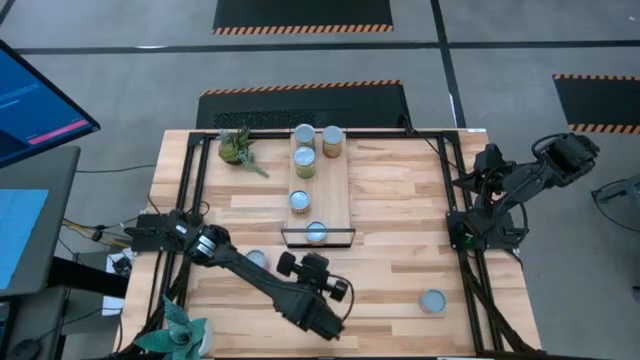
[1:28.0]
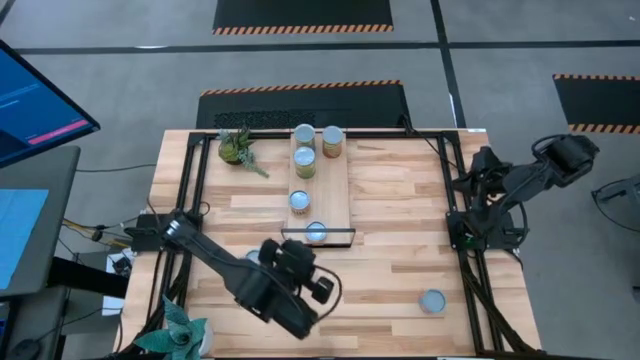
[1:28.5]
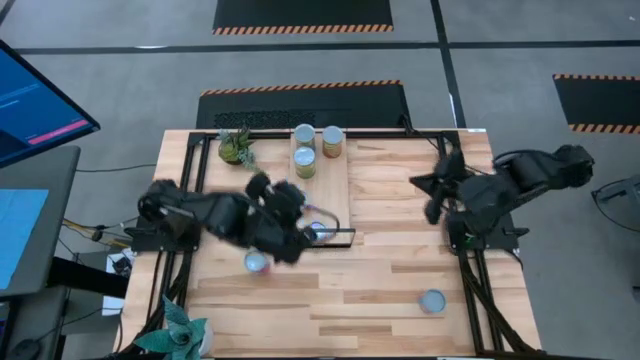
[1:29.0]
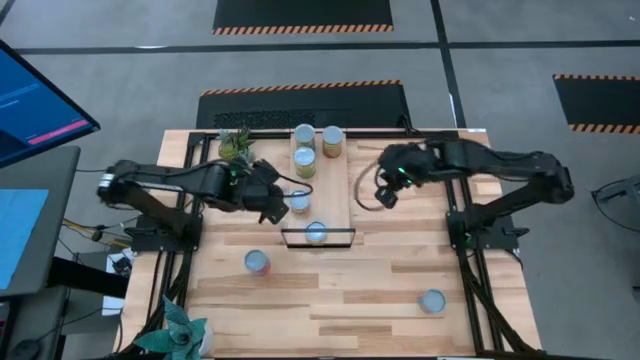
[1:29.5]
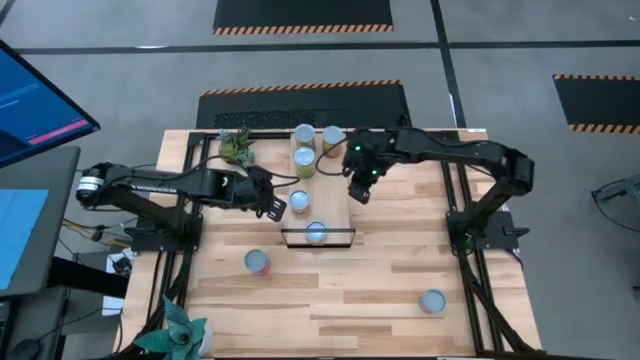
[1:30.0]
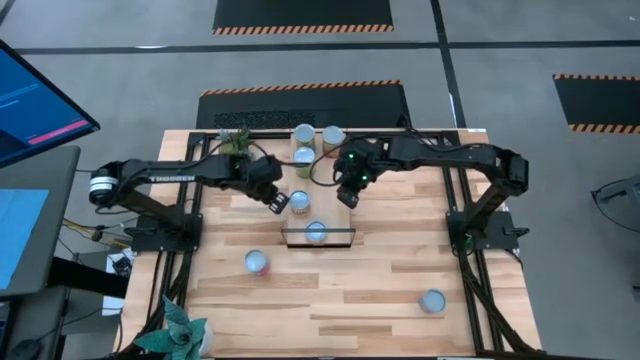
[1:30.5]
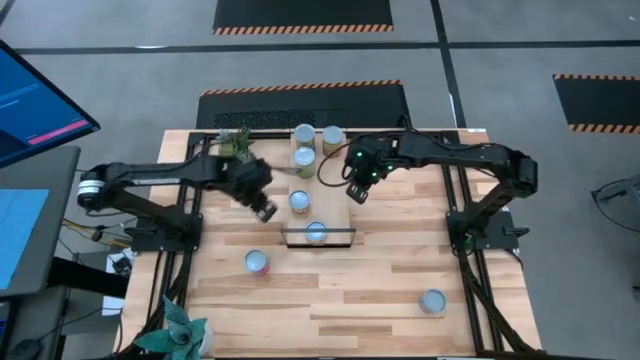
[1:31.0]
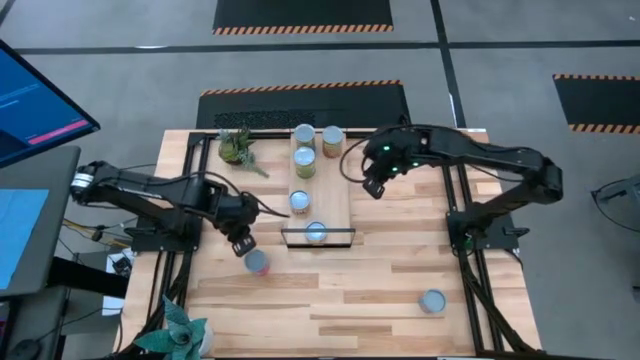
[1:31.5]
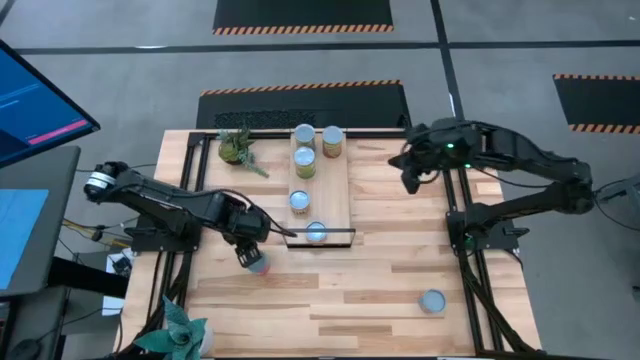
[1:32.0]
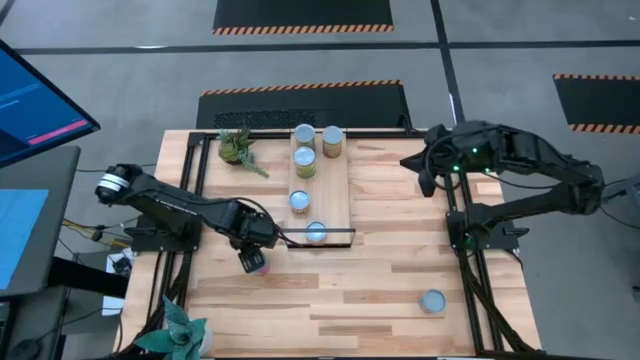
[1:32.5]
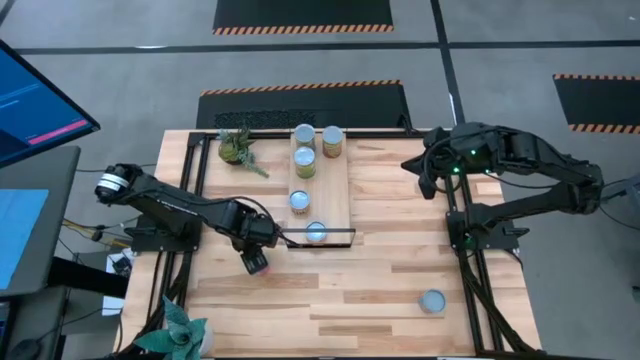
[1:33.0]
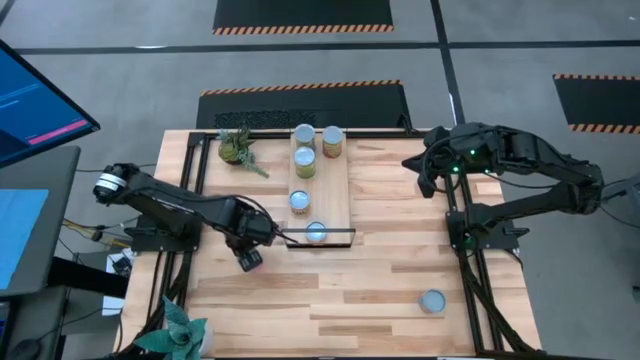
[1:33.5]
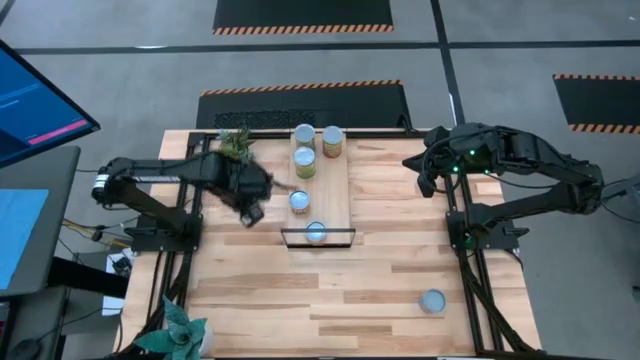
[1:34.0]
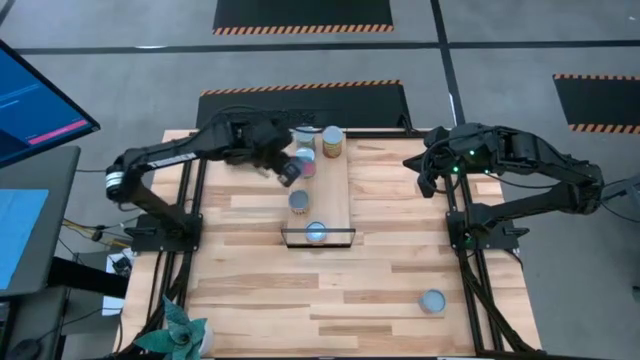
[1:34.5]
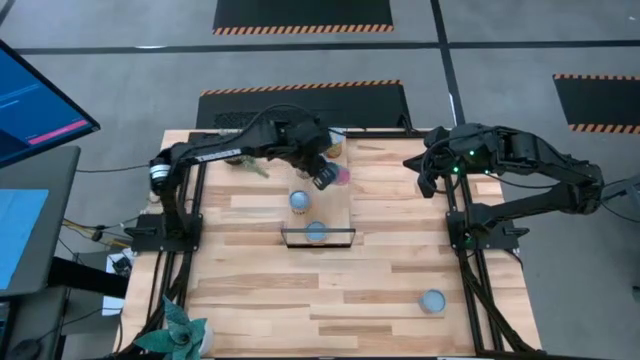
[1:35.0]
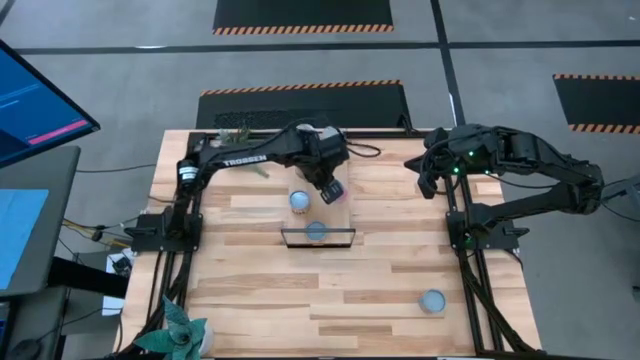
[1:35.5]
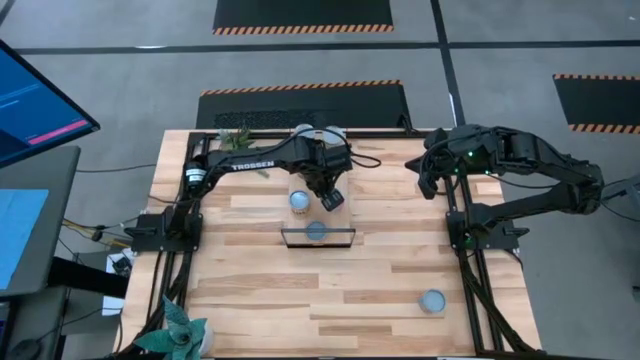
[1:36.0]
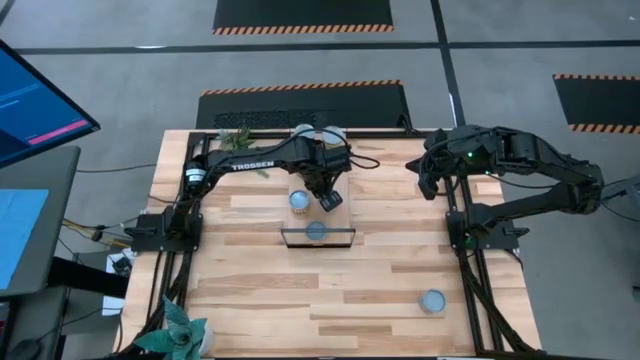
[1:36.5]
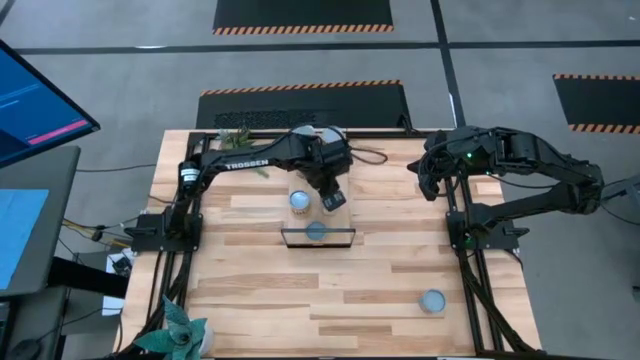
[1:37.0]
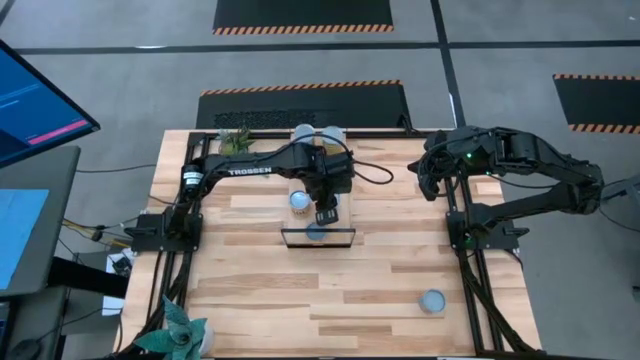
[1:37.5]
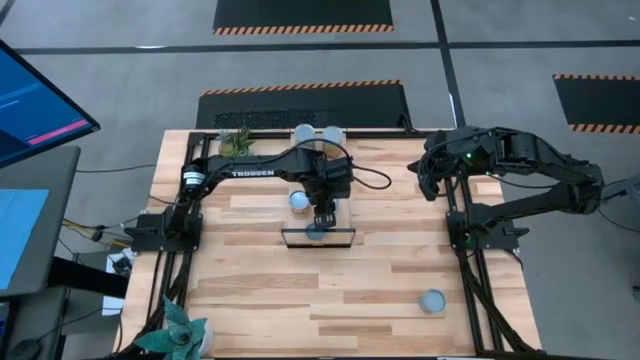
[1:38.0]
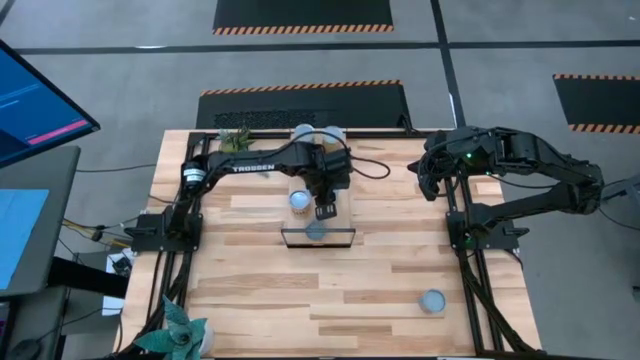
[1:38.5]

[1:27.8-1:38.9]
Task: Pick and place cans onto a shelf
Put the canned chicken soup on the shelf

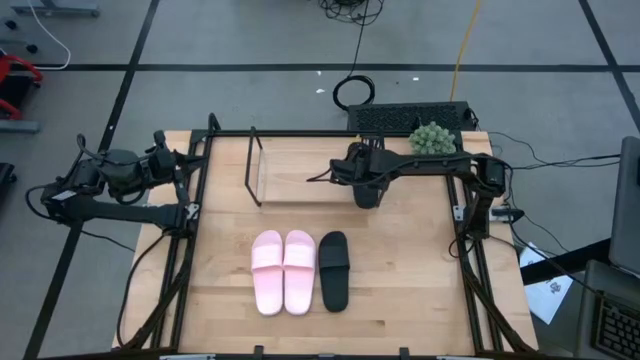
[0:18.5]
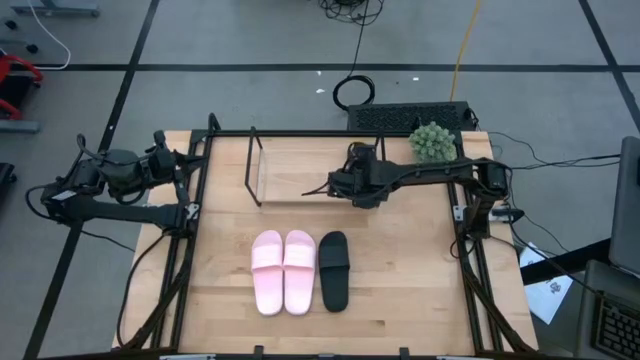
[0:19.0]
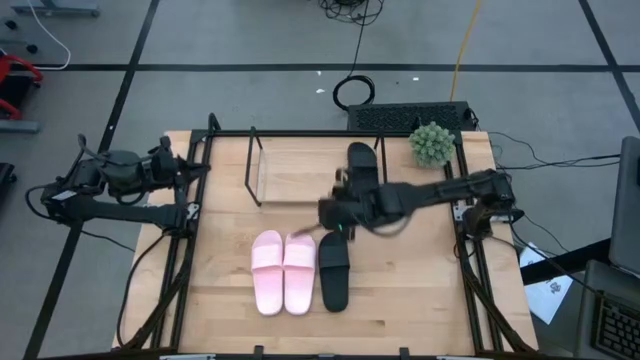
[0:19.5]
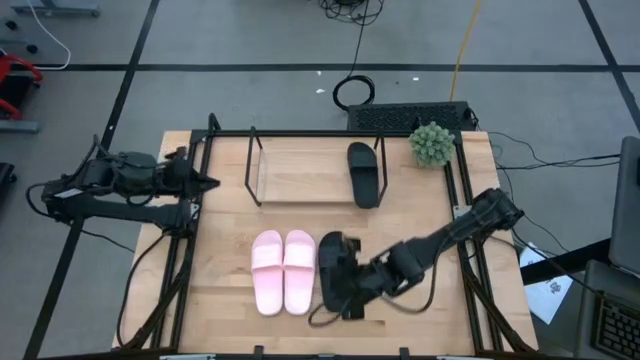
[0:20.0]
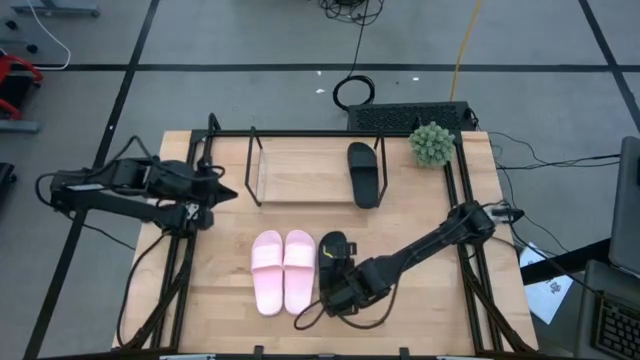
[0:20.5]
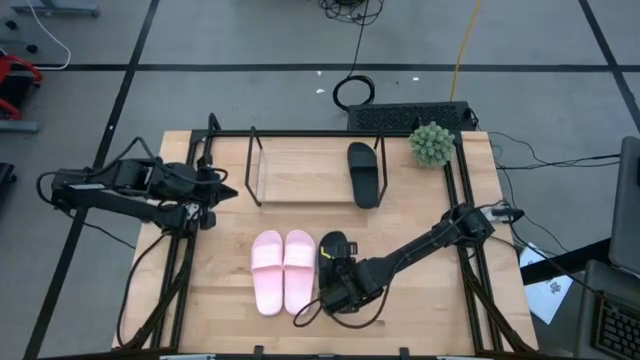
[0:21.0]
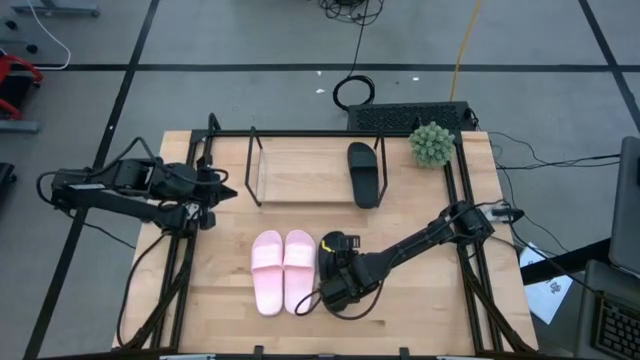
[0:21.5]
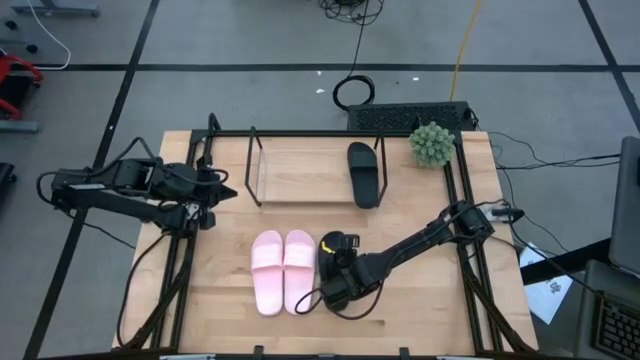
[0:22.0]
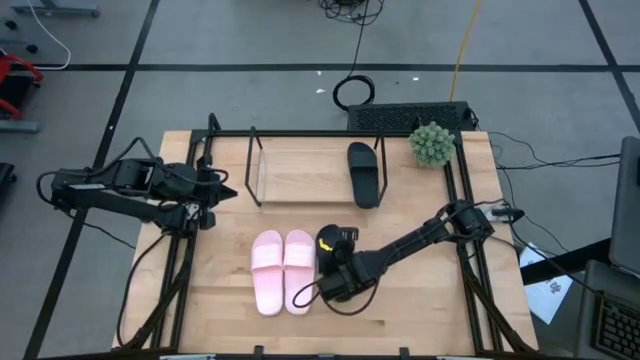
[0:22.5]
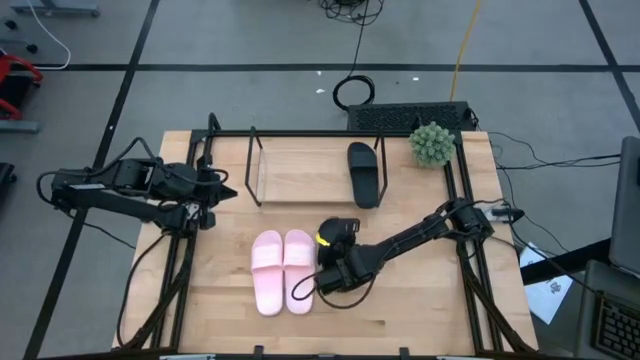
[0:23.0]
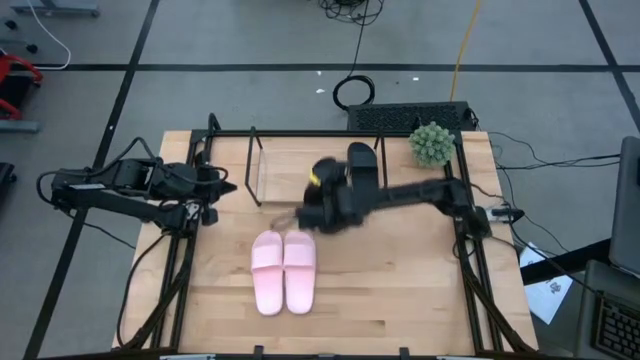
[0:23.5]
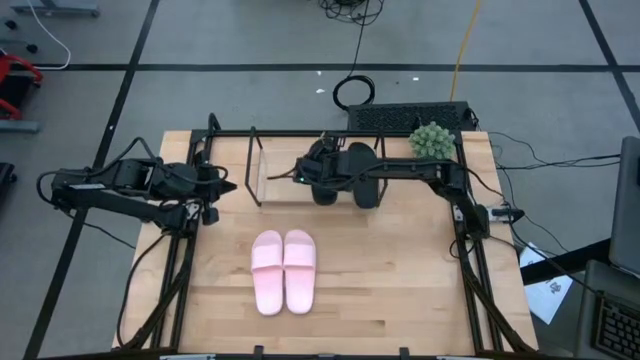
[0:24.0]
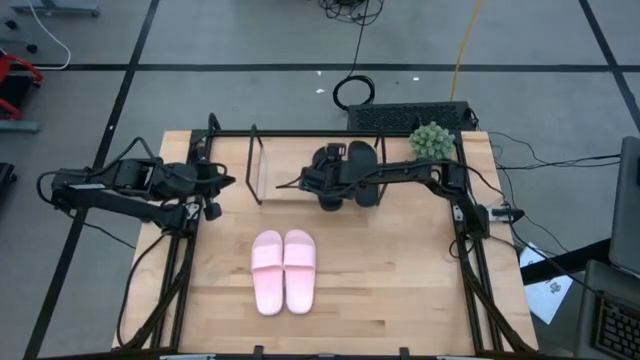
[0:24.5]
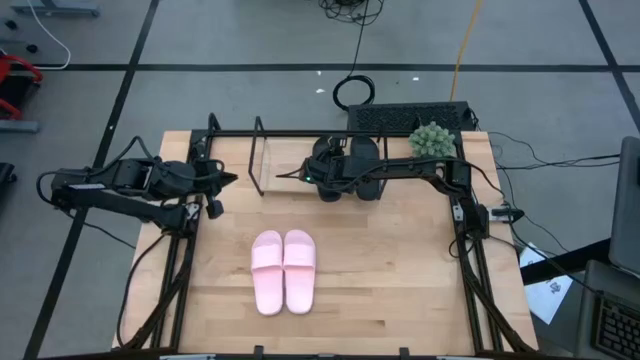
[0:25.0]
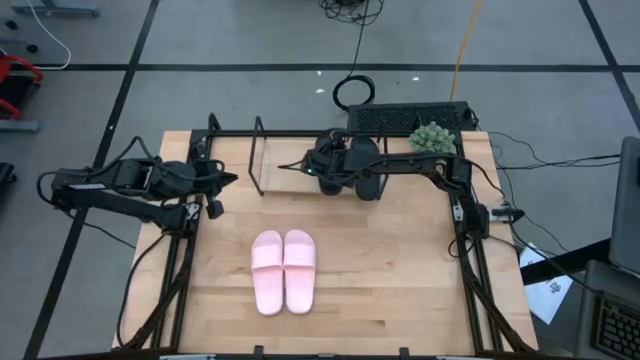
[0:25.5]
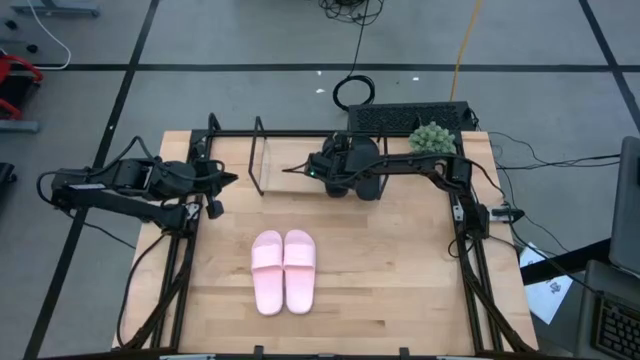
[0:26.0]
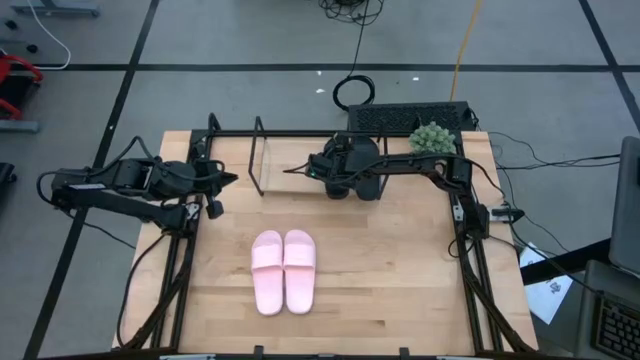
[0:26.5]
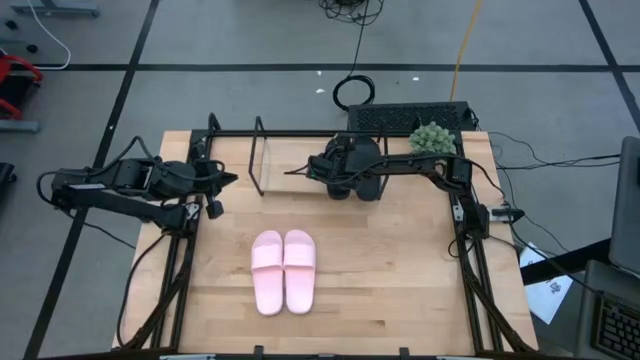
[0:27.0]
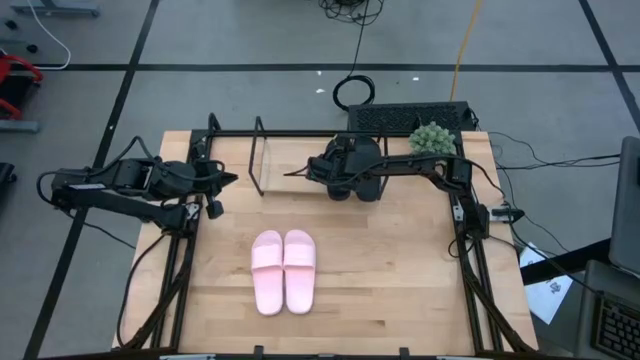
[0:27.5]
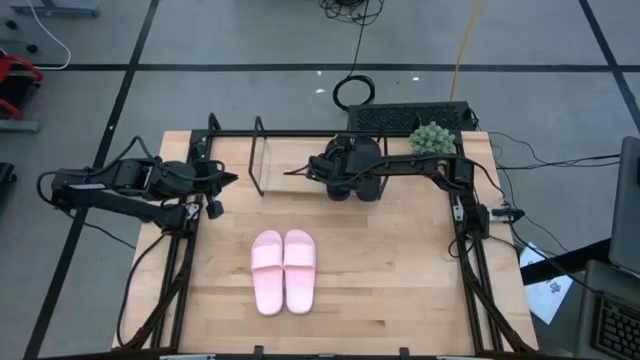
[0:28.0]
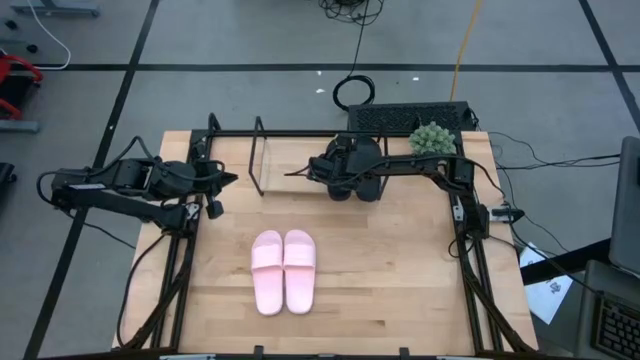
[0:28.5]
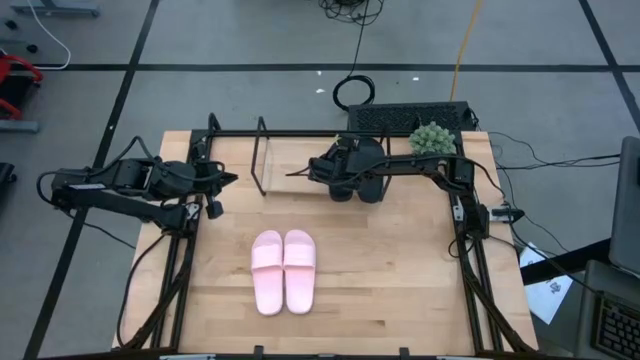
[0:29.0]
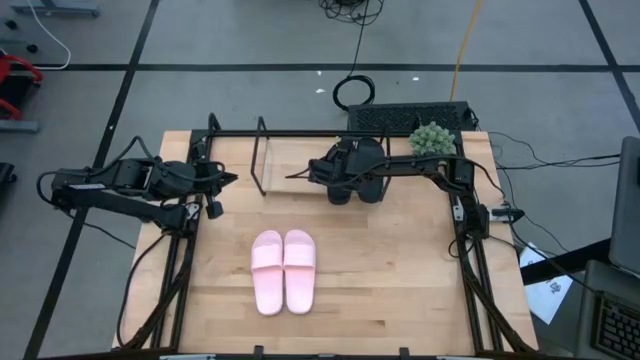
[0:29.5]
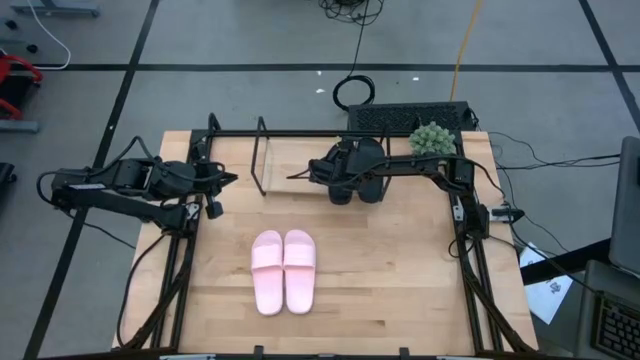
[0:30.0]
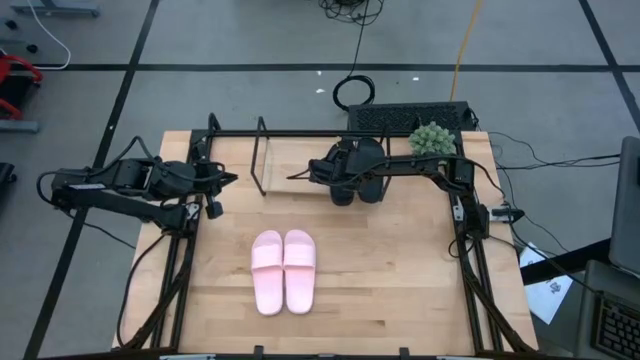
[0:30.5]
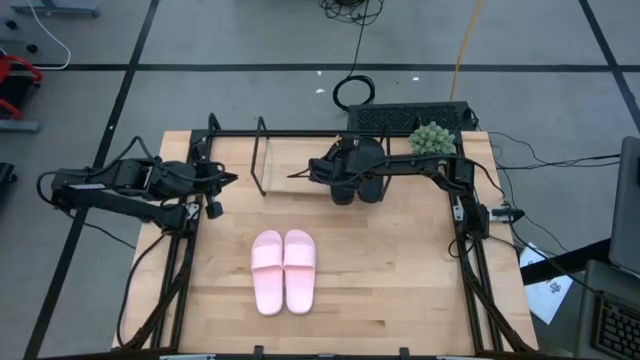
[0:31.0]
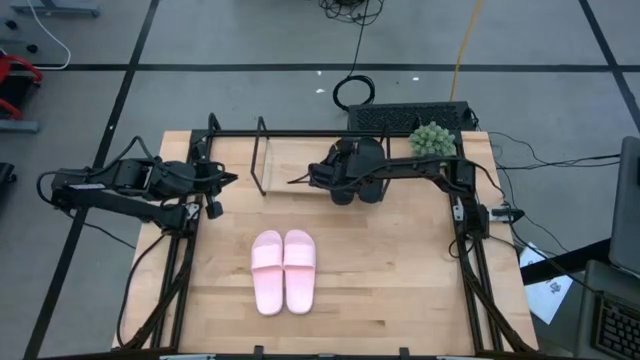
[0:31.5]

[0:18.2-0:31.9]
Task: Pick and place slides into the shelf
Put the left black slide on the shelf
